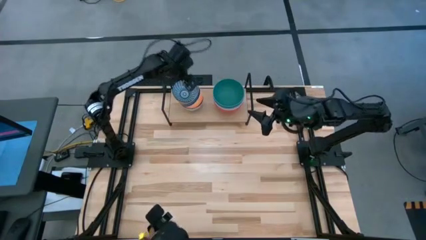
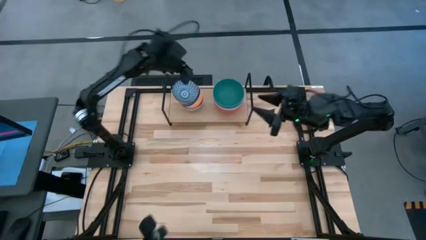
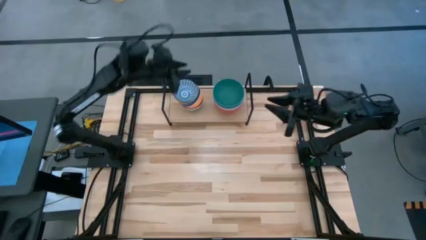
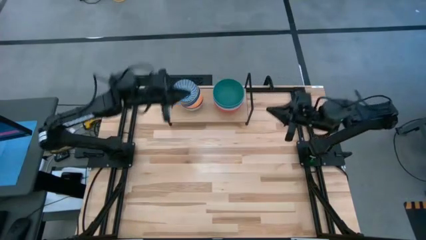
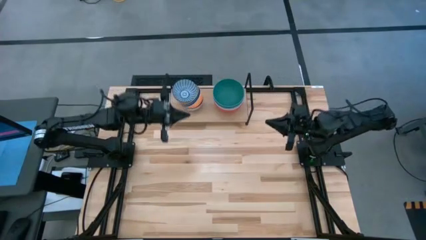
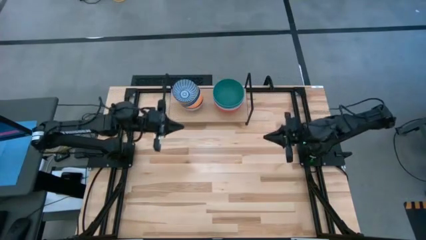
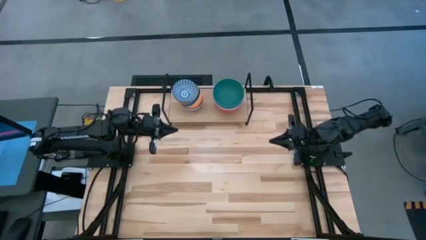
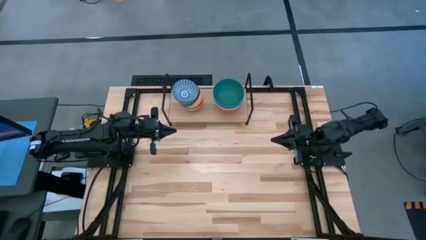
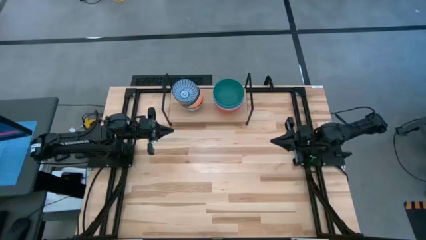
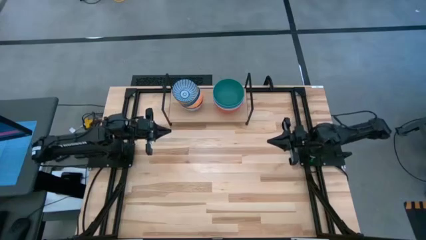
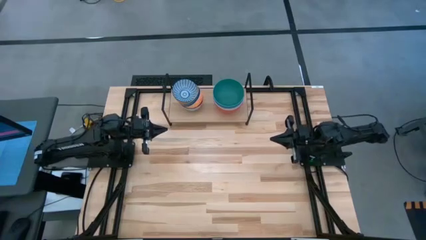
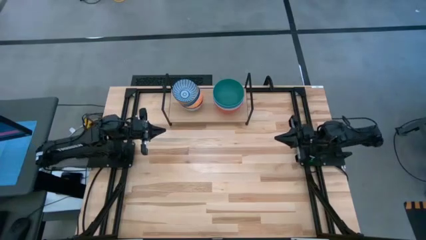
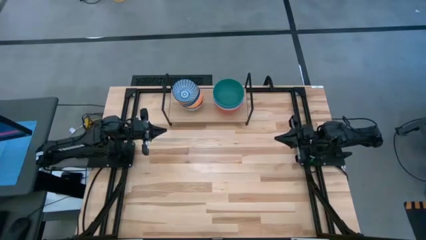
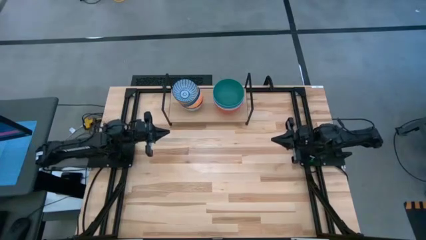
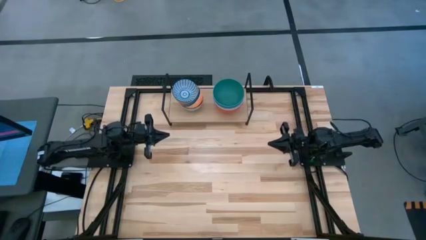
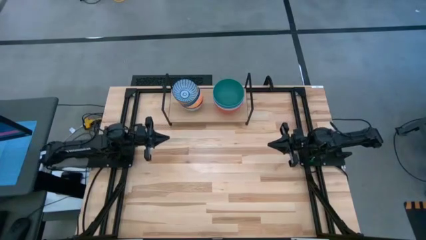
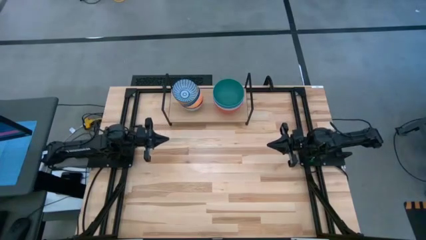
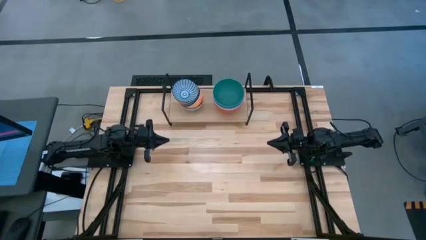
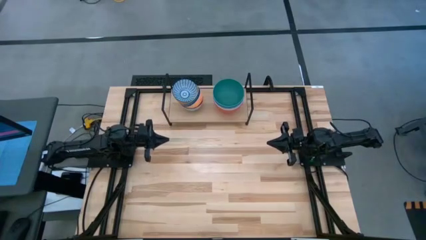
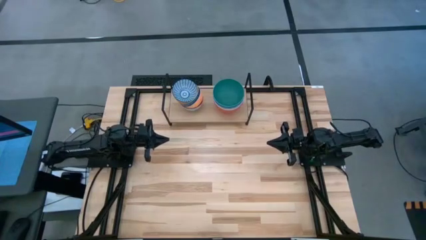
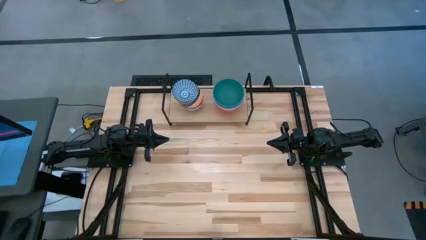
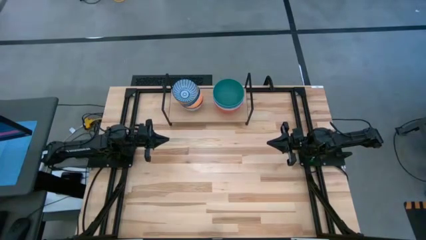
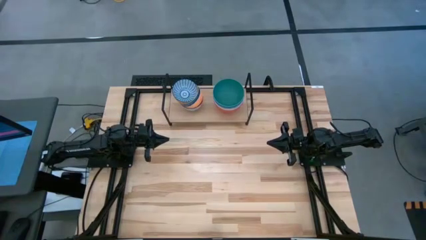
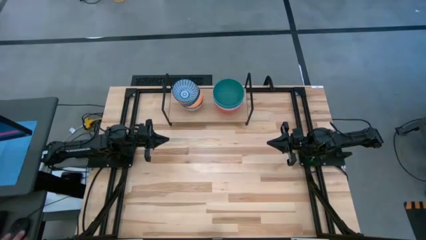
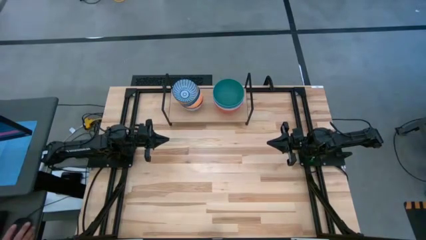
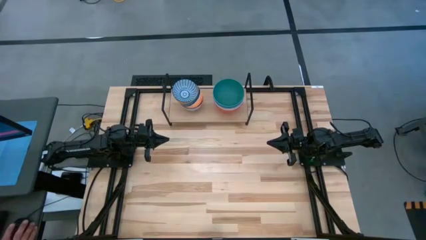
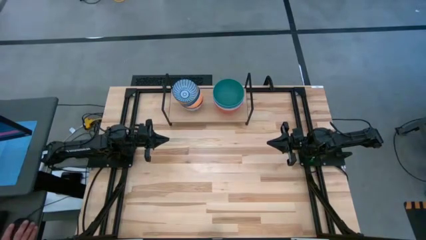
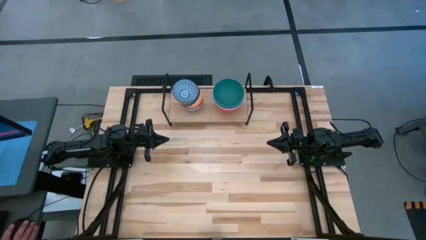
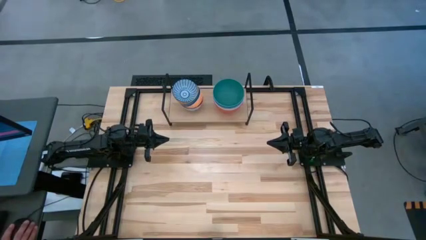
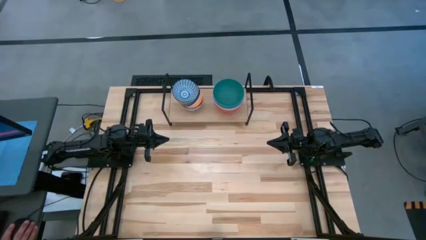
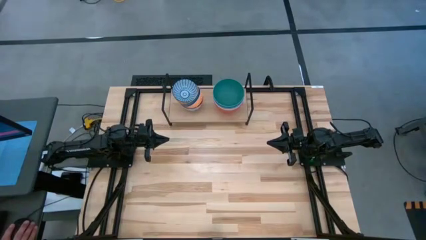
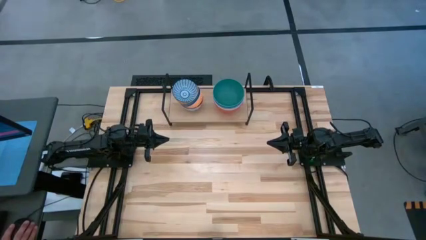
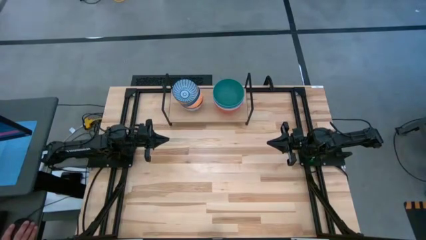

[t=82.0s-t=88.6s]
Task: Place and stack bowls onto a shelf
Return to Home Position

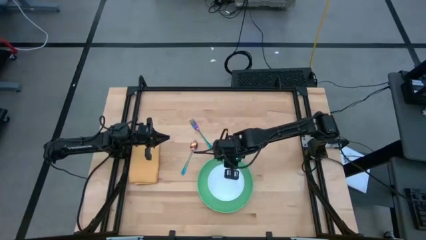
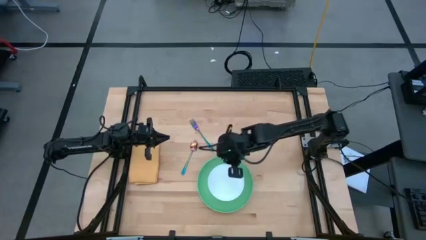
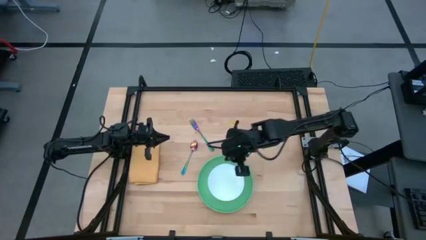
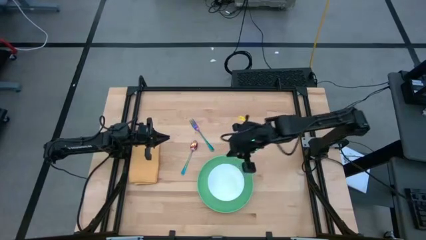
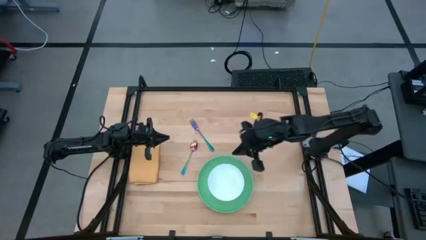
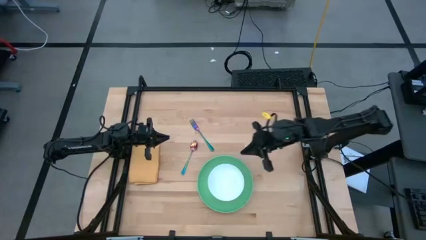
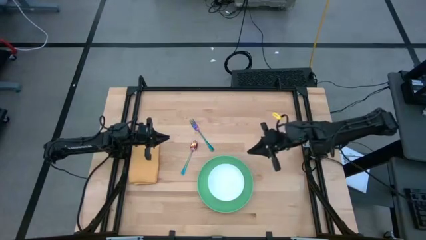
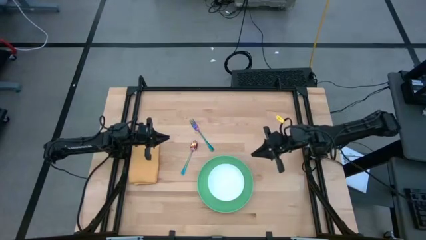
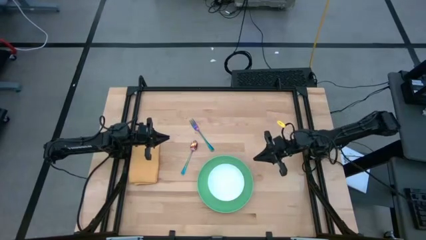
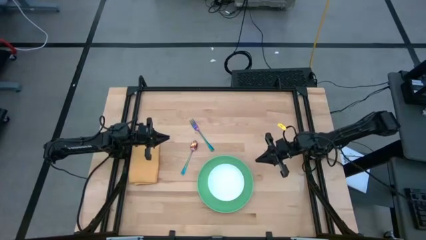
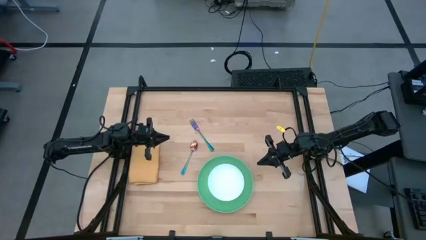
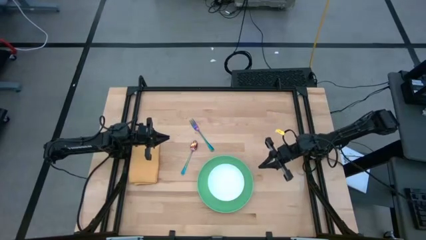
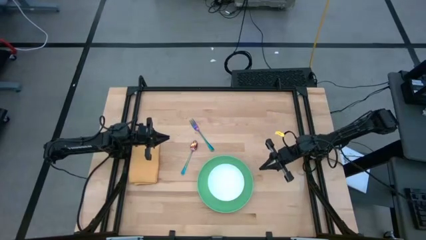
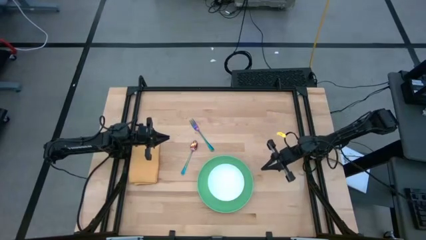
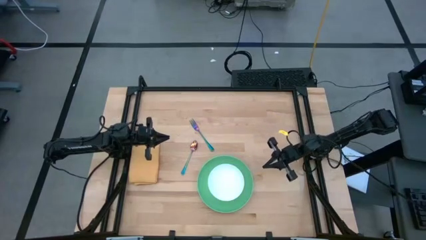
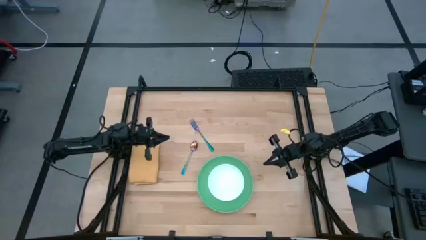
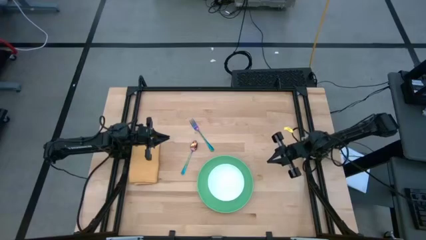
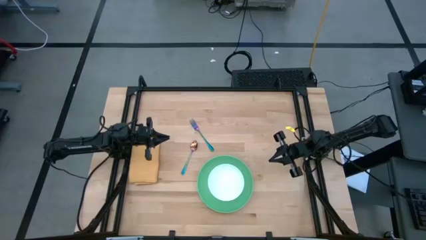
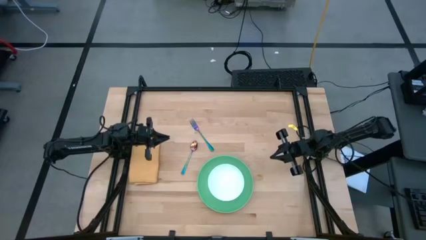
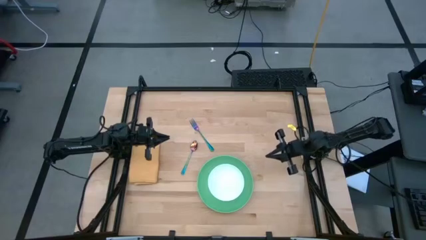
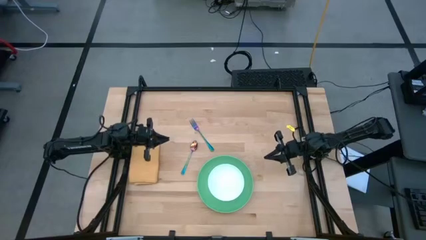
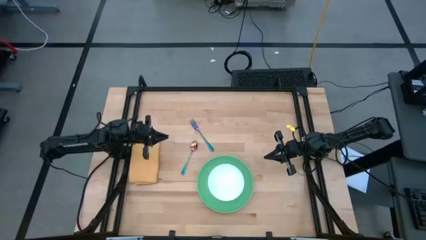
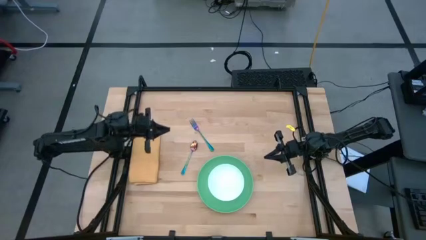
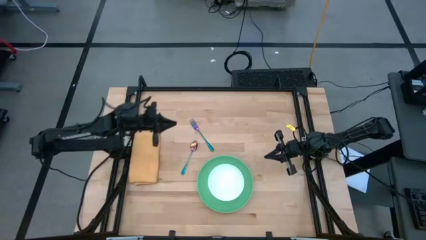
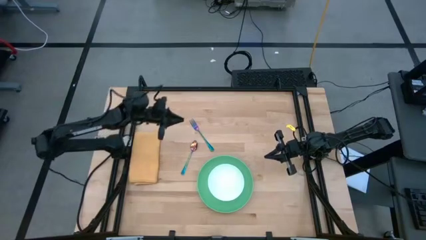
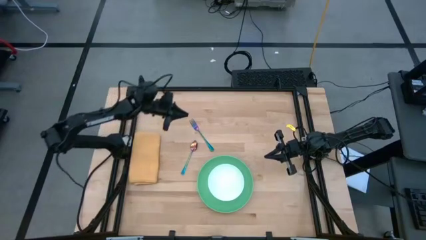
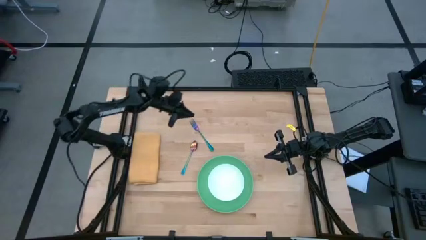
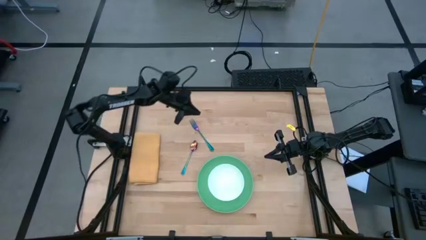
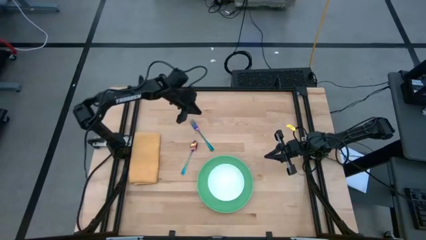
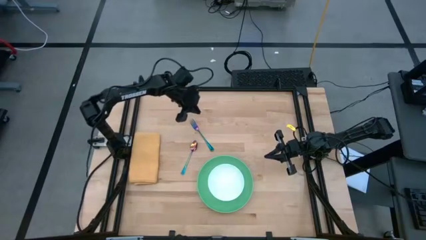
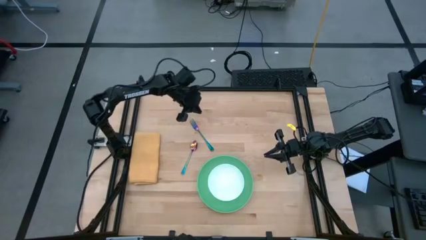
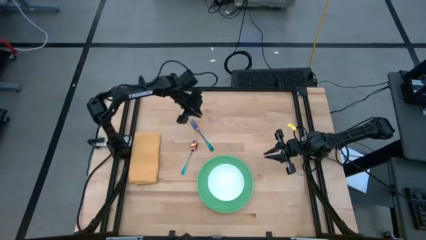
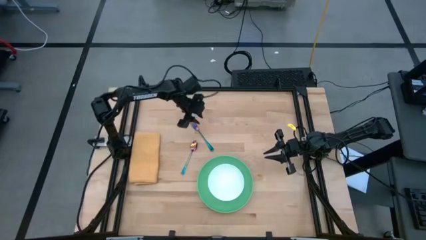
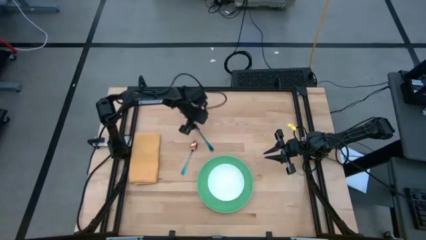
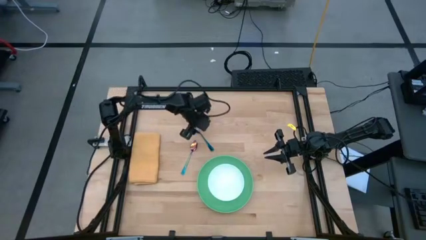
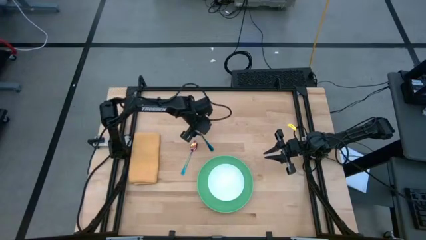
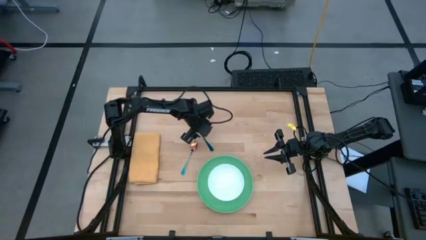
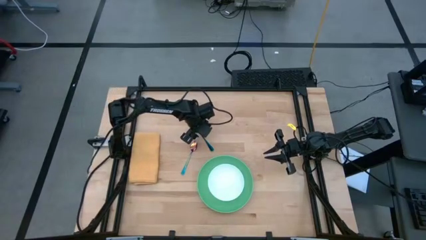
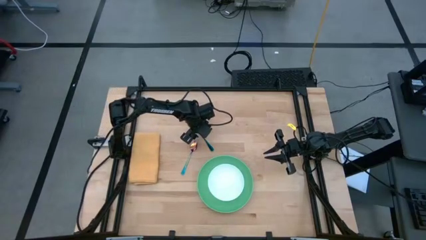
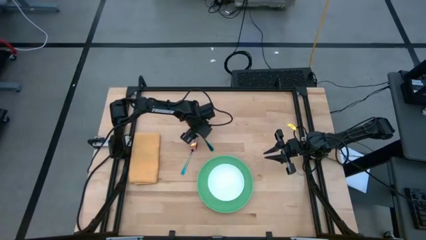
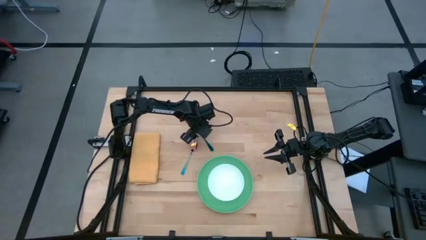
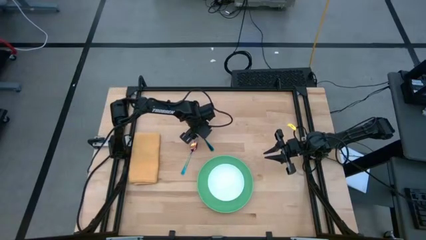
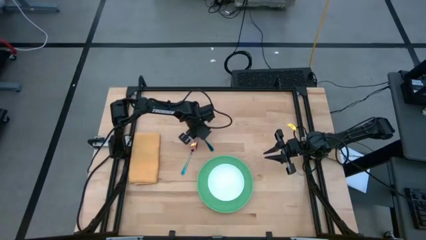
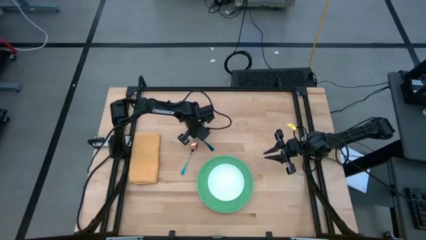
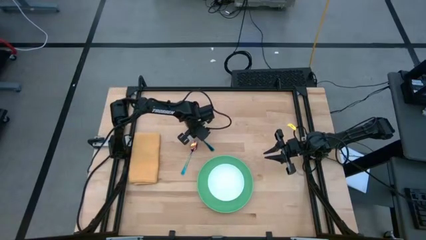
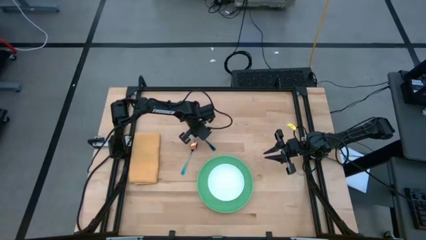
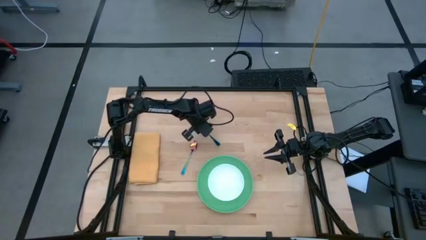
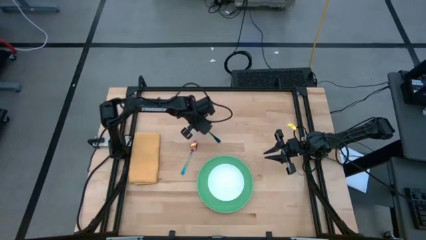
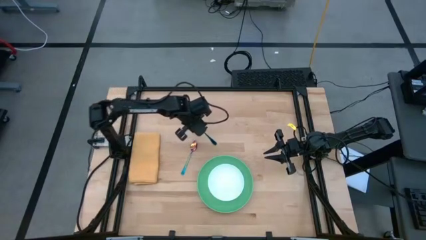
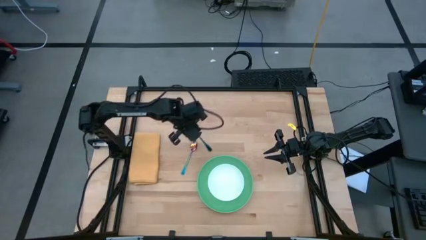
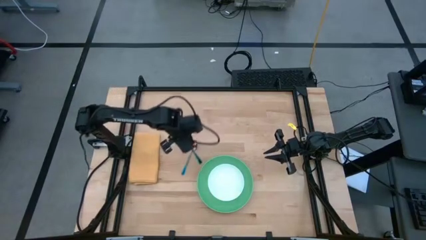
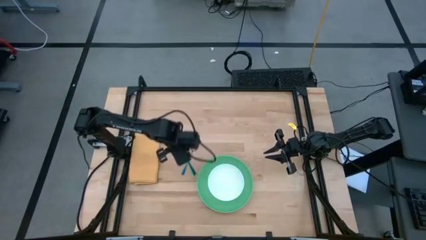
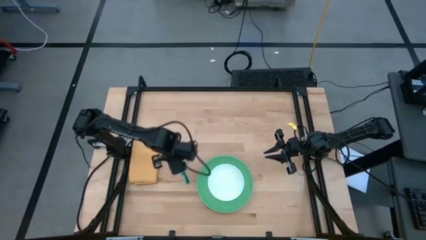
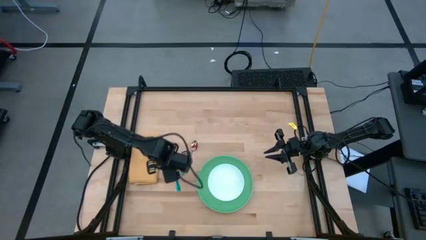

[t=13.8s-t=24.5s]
Task: Set table place
Put the violet fork to the left of the green plate
